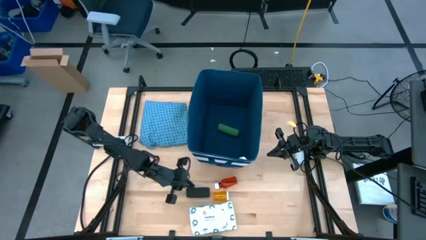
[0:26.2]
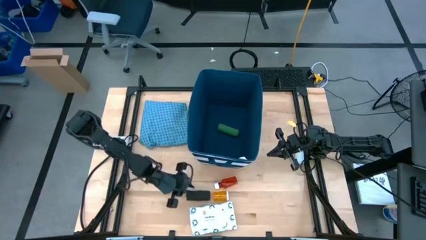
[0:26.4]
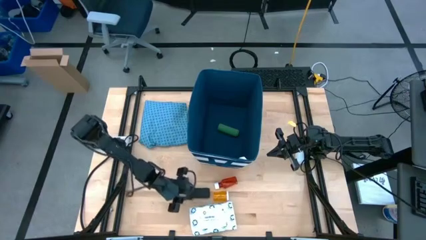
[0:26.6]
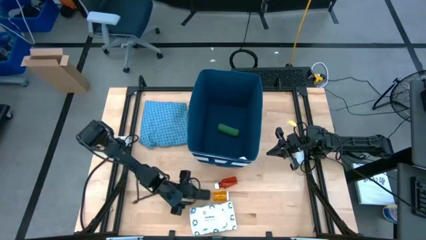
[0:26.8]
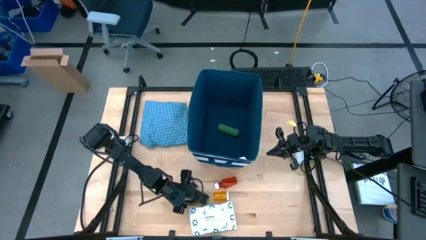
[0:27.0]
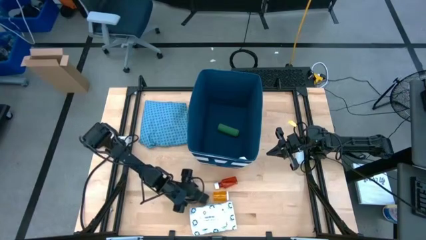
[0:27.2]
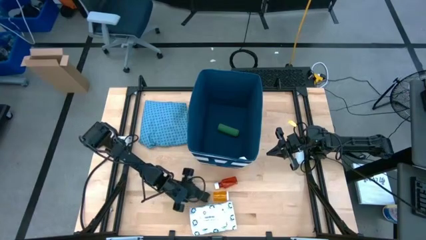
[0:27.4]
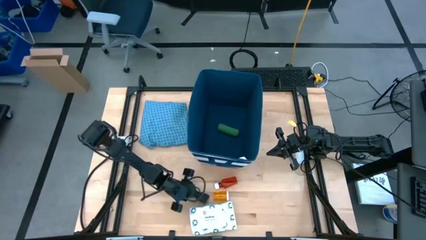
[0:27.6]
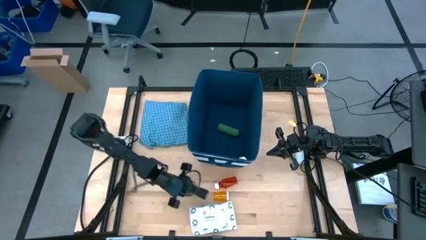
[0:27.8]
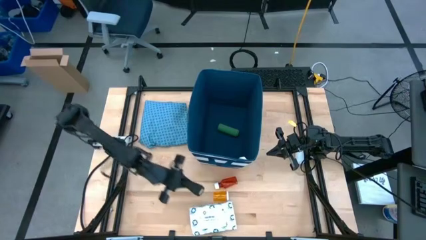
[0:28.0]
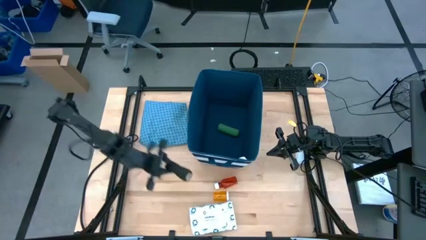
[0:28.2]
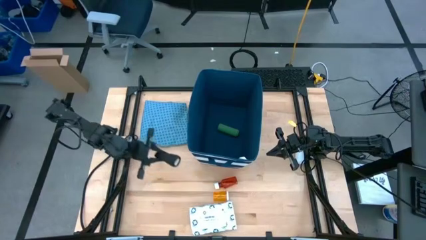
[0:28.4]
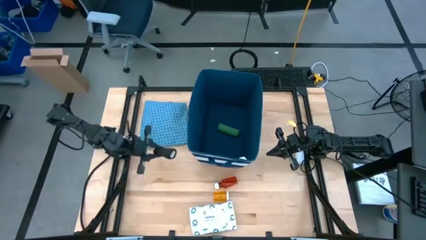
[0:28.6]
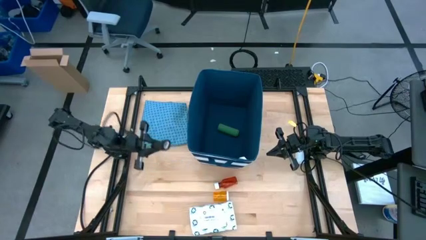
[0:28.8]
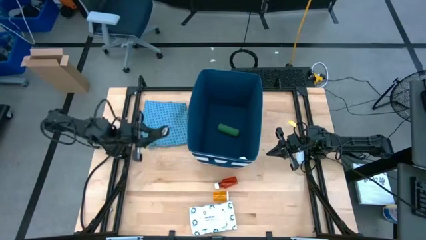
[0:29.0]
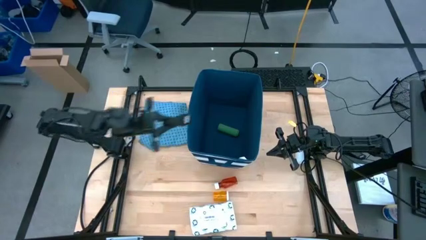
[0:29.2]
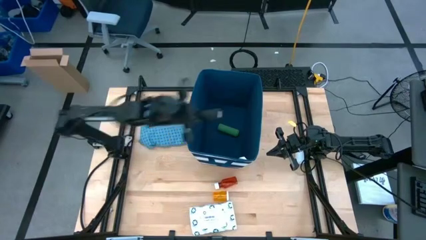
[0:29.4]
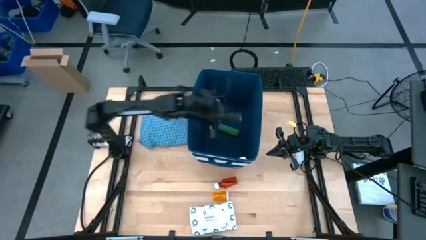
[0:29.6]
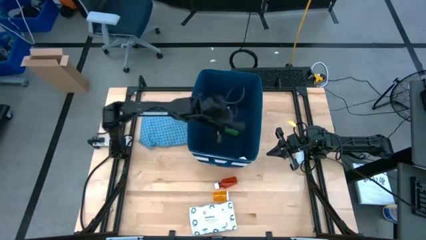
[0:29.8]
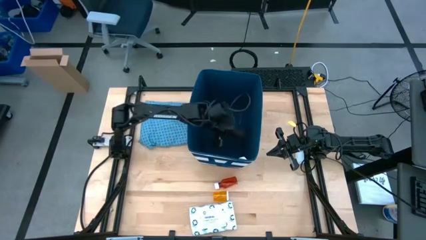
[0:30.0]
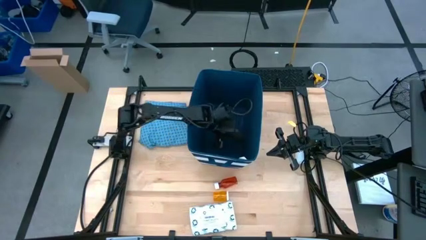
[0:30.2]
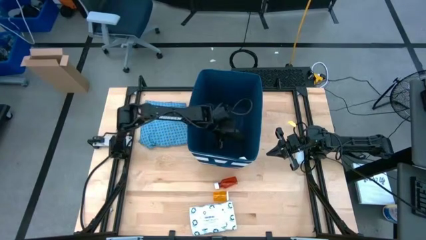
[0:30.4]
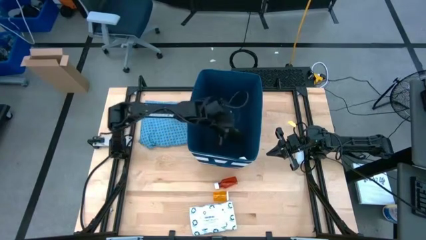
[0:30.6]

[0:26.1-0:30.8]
Task: Pick & place medical supplies in basket/bin
Put the black bandage into the blue bin

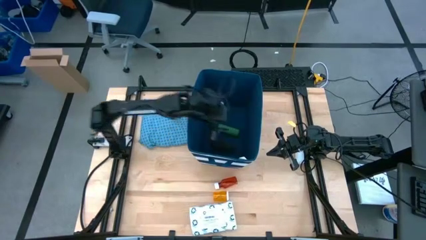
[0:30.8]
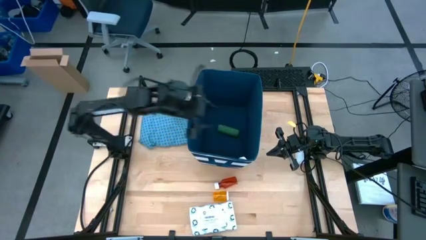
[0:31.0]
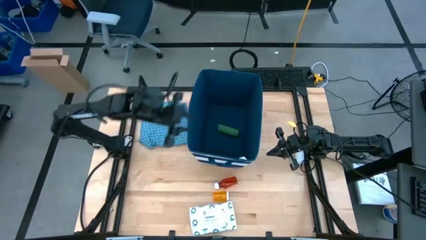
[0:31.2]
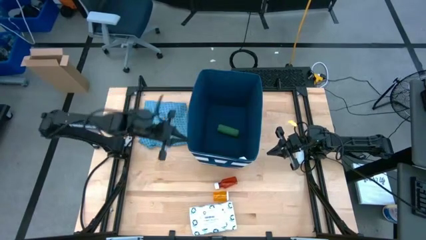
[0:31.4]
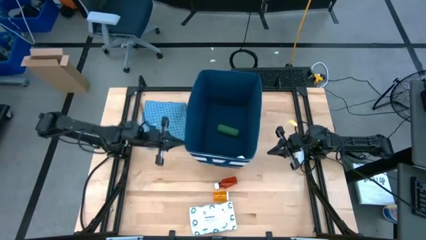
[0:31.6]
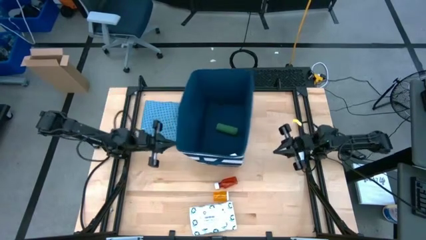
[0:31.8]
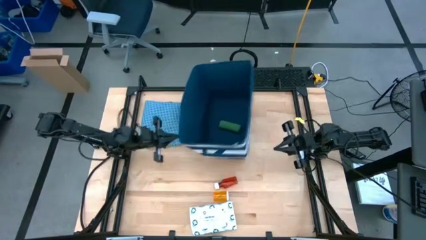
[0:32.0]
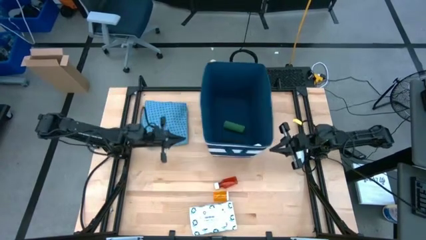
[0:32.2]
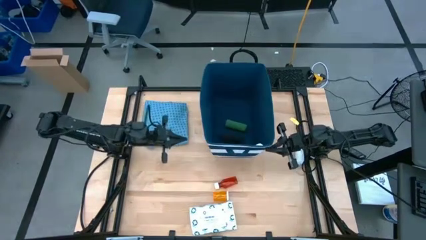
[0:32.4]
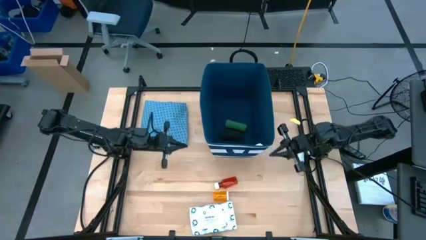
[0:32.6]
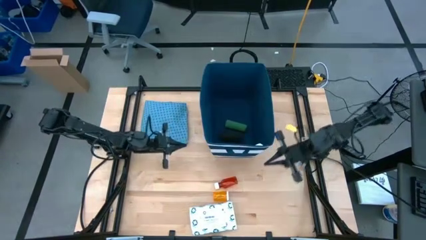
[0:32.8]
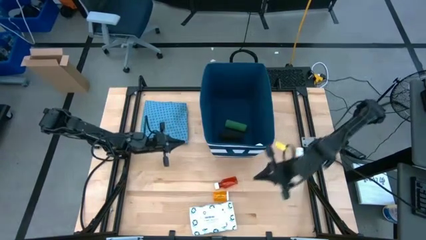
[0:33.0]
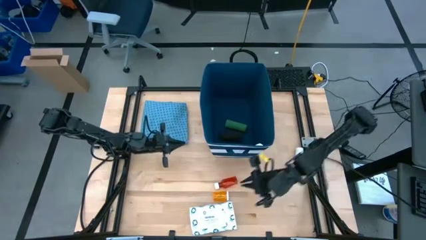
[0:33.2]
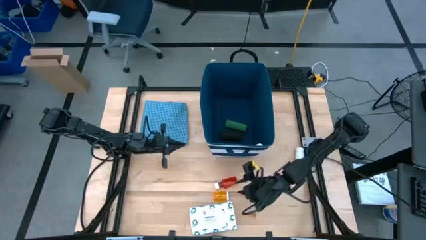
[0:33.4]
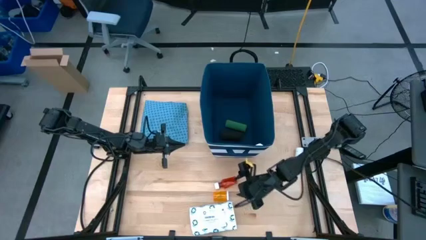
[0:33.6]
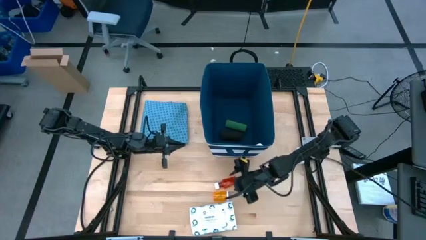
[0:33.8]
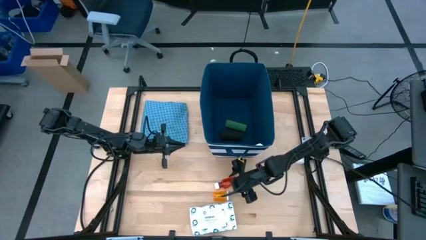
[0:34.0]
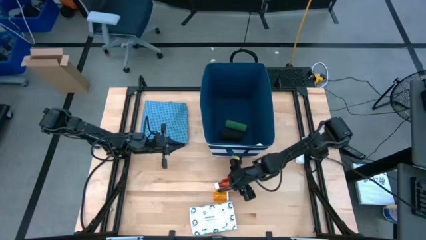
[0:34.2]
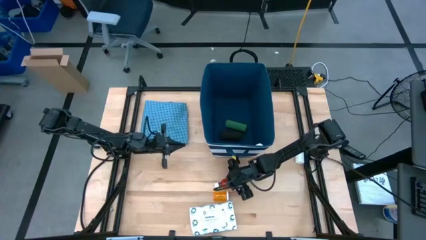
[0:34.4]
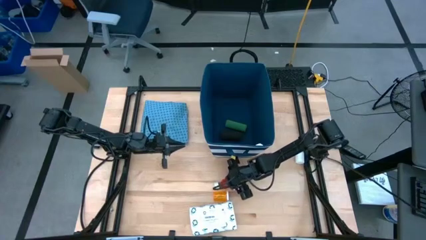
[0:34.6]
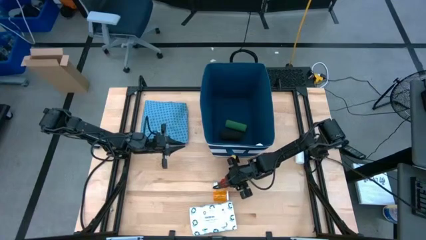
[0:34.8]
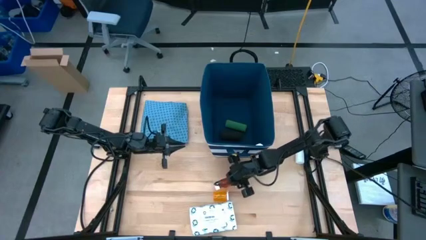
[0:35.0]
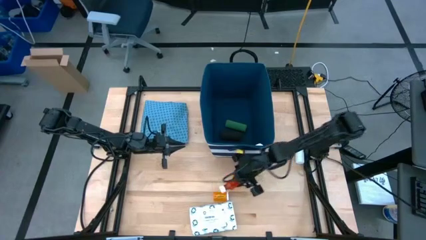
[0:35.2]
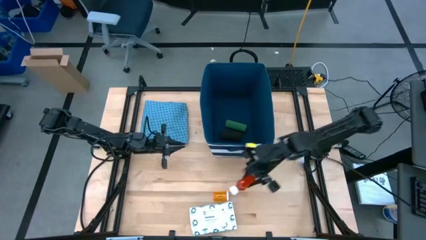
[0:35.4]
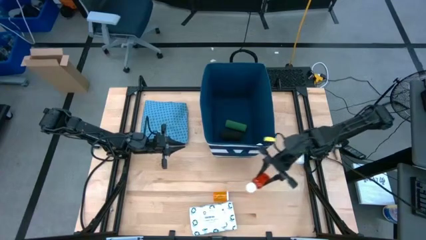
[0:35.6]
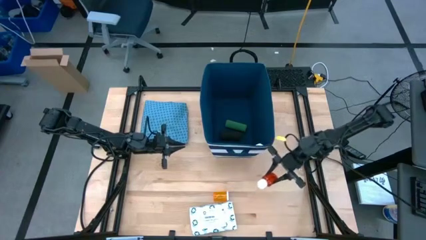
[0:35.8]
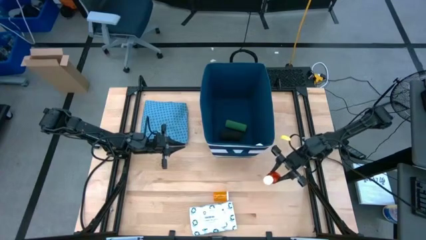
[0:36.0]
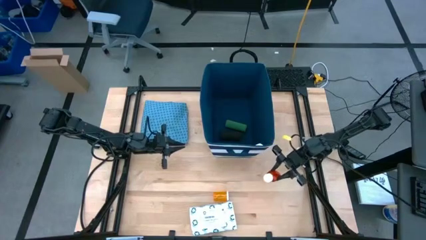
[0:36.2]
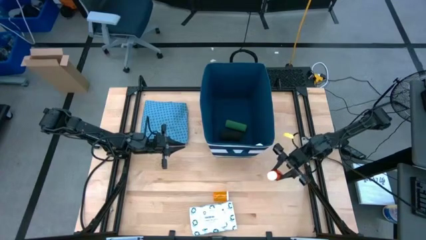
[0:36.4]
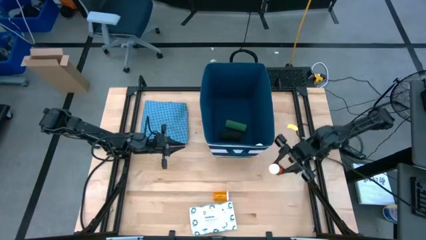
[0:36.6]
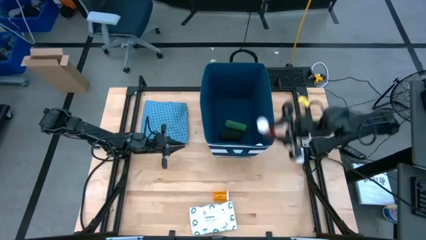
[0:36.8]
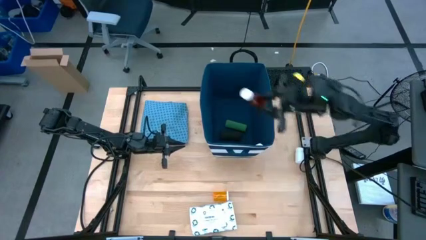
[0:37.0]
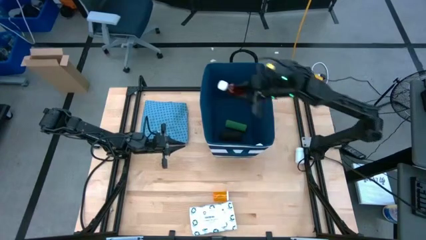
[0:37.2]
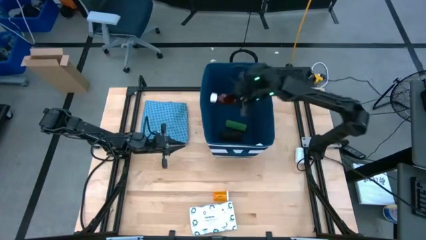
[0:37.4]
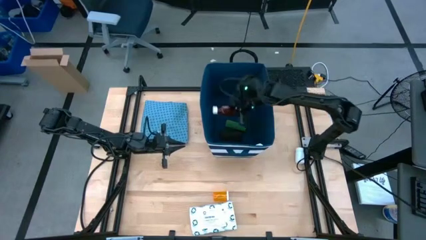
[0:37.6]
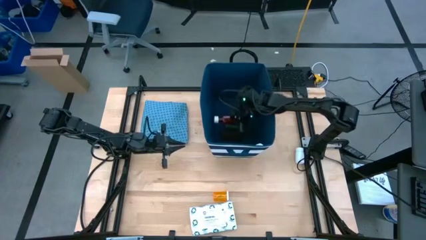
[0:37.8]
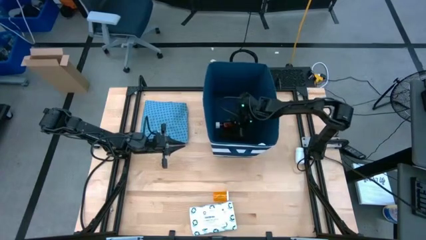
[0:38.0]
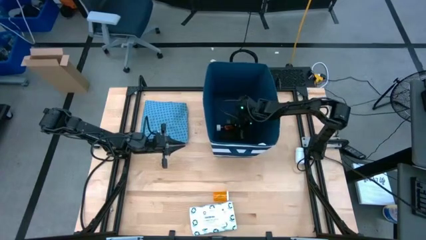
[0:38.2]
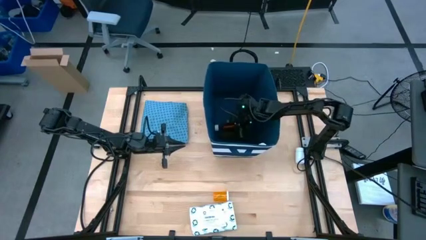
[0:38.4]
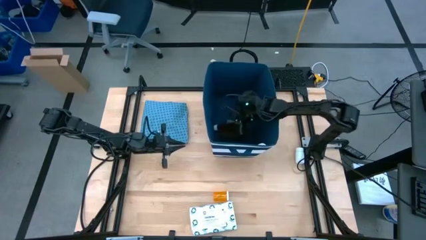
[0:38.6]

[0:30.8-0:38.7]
Put the orange medicine bottle into the blue bin
